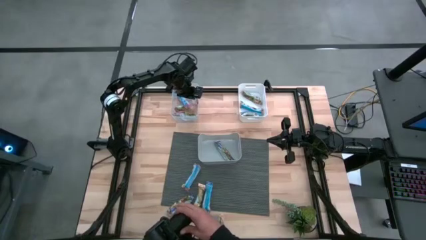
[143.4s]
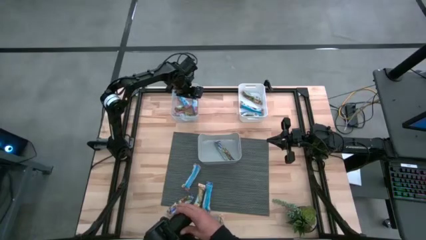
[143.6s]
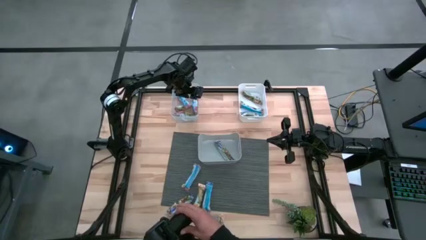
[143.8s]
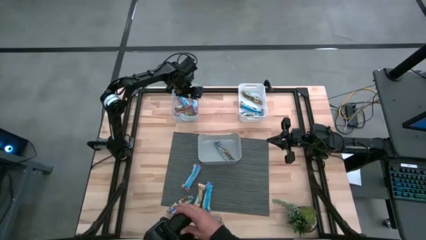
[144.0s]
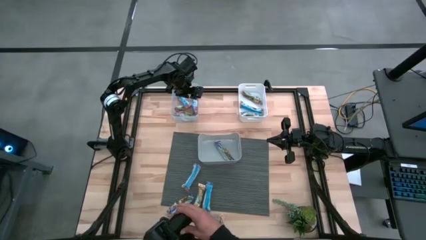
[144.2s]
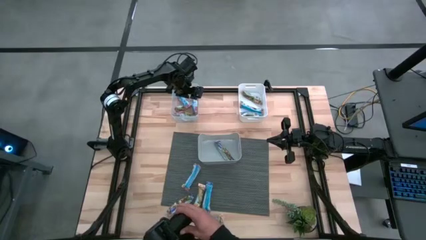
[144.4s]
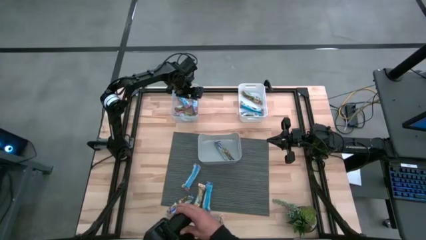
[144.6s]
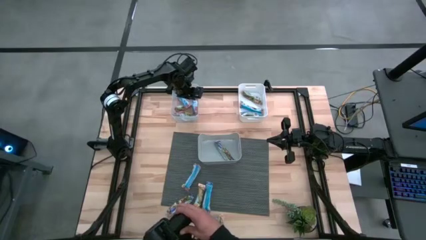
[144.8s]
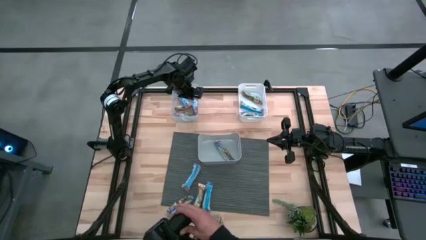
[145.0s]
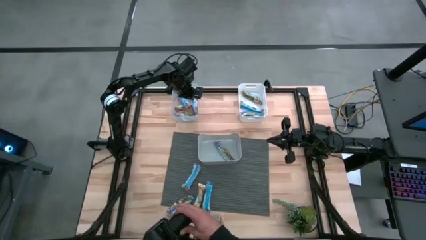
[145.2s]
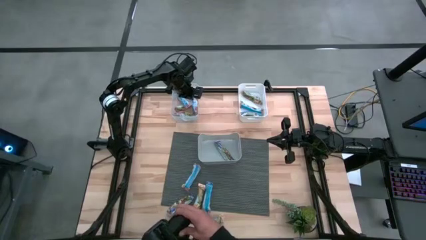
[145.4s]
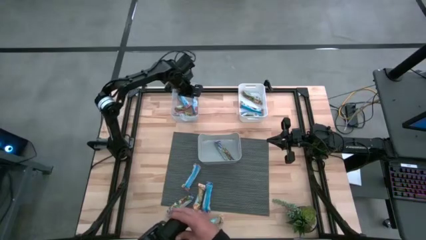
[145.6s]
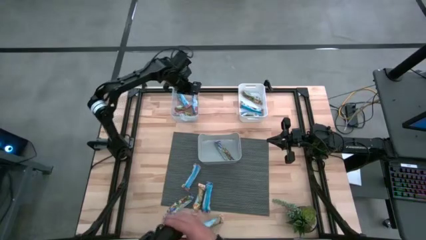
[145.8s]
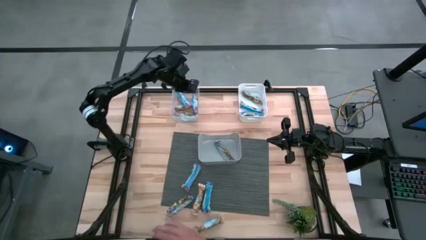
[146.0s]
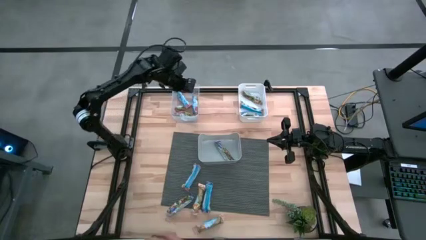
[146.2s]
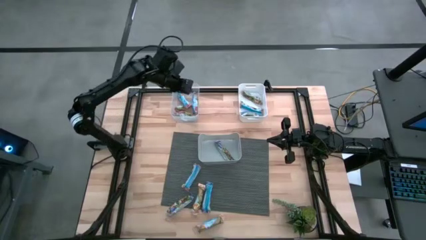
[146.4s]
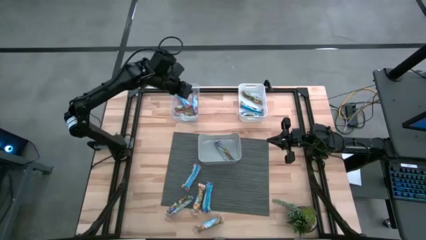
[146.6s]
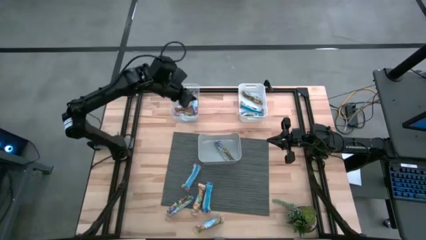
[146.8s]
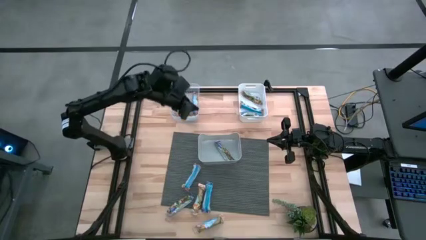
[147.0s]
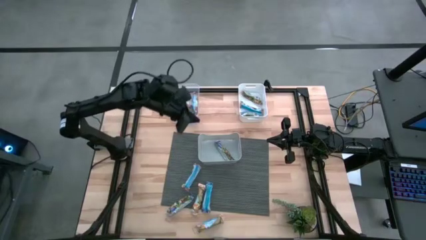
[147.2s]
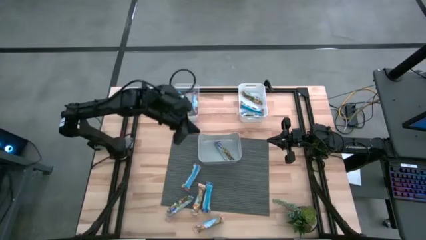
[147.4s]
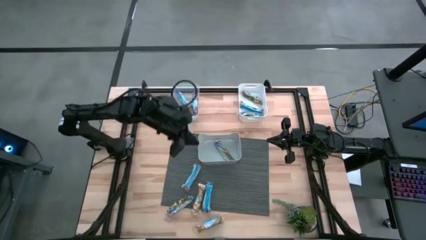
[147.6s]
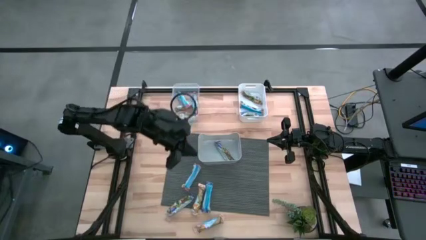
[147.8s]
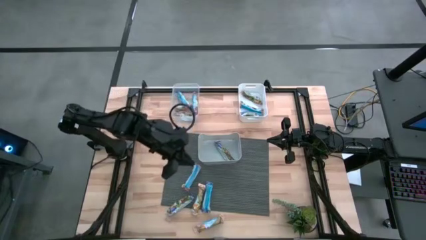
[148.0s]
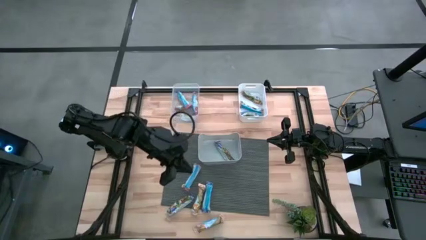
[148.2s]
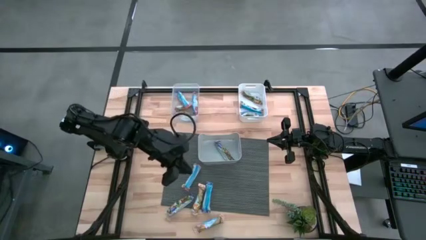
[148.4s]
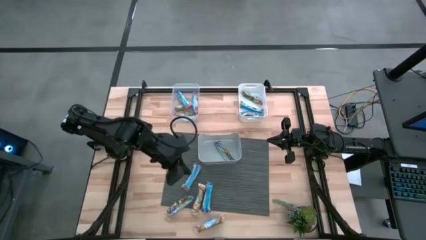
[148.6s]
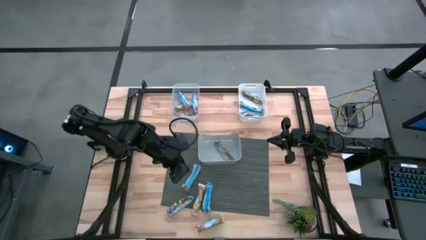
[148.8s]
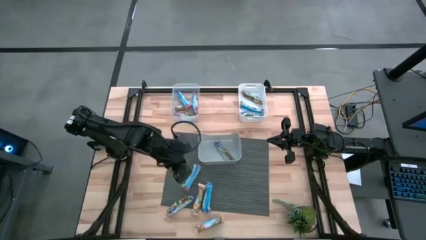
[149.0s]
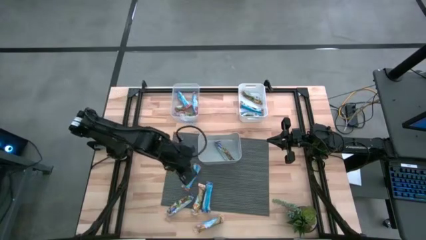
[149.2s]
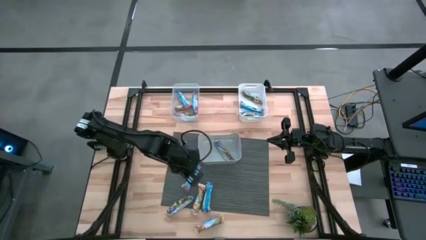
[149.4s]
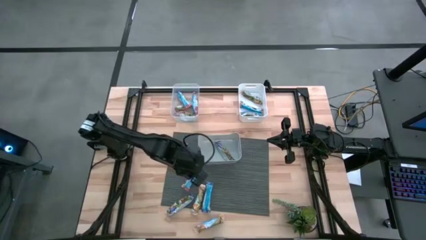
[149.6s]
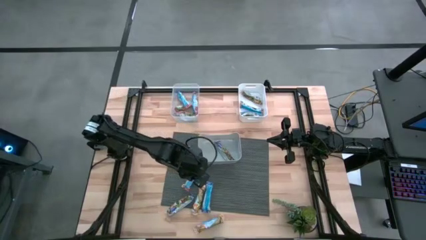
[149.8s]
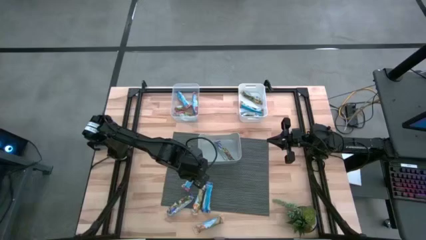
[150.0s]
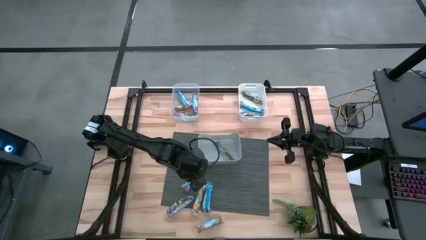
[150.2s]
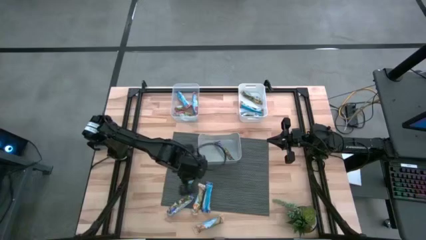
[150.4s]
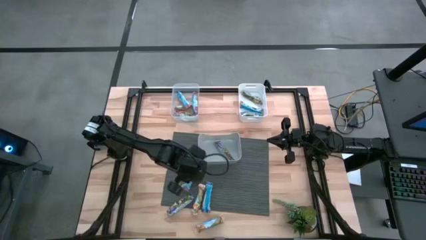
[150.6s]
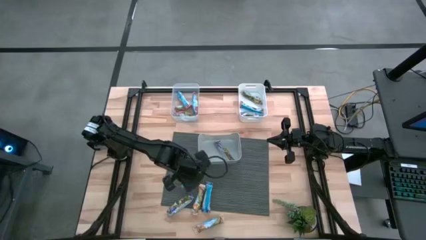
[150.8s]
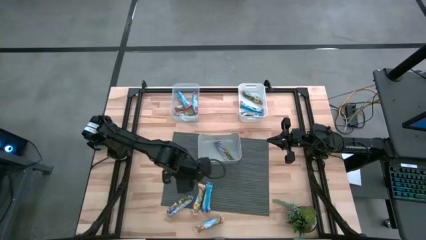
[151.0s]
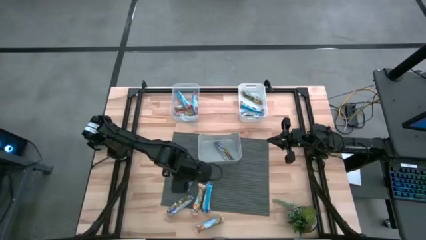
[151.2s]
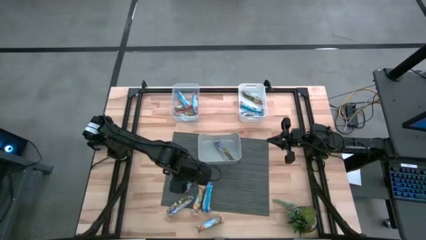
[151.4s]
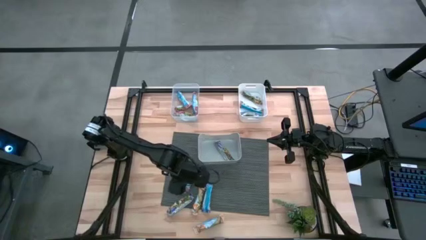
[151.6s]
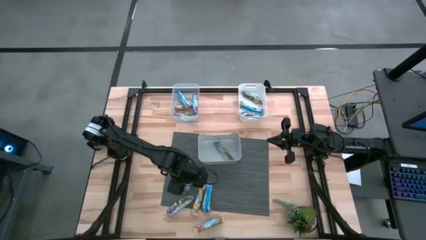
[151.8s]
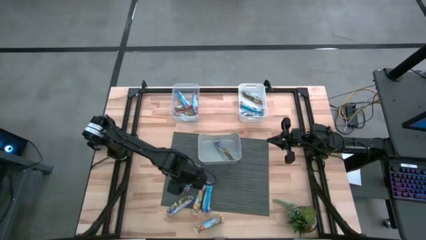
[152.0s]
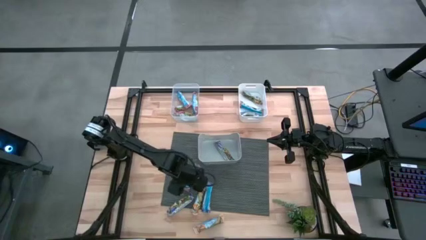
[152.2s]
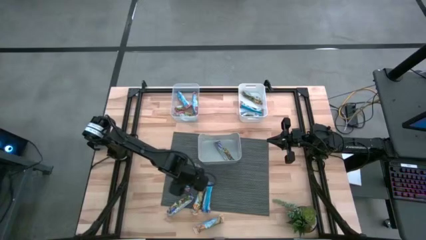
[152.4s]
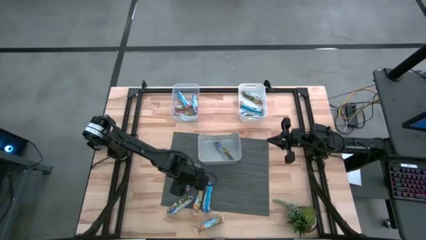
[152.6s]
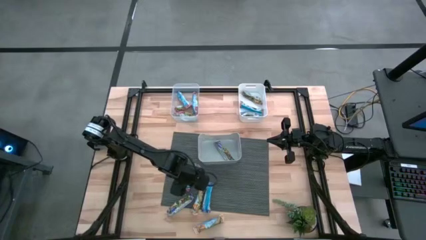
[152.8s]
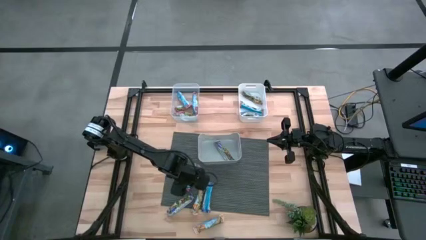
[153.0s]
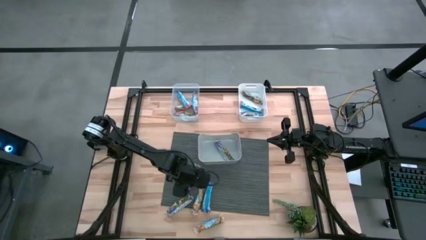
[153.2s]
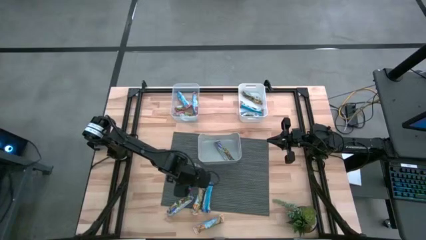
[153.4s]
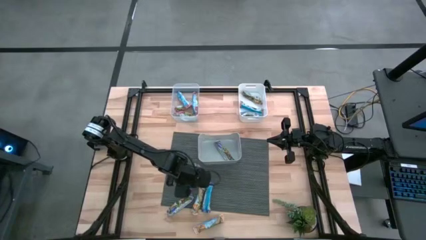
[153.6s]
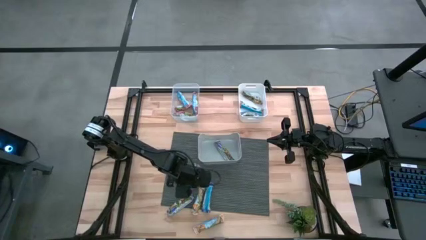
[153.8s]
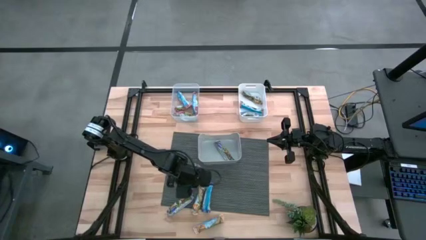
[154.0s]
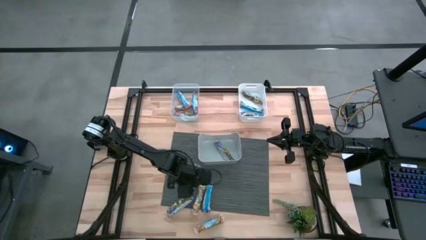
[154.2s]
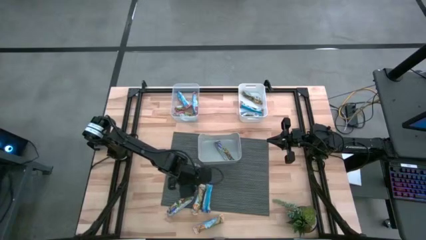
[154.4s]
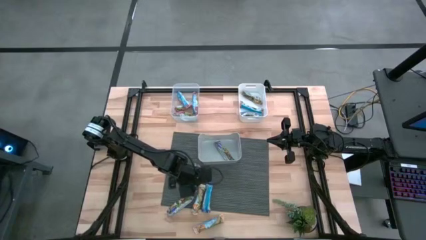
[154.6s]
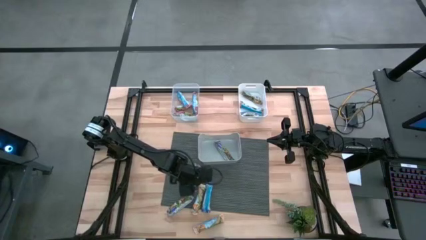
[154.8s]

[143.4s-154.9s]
Task: Pick and place Granola Bars by type
Put the red granola bar into the transparent bin

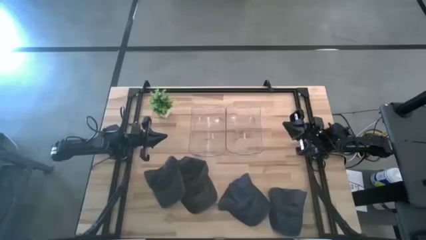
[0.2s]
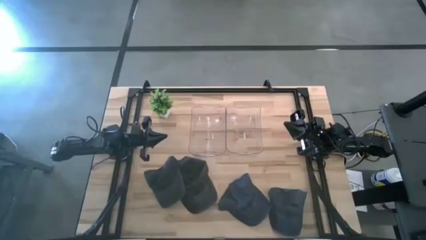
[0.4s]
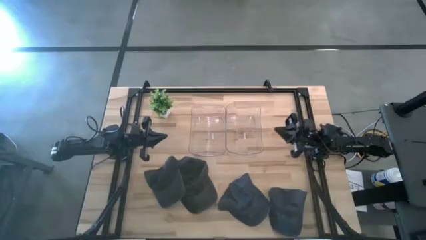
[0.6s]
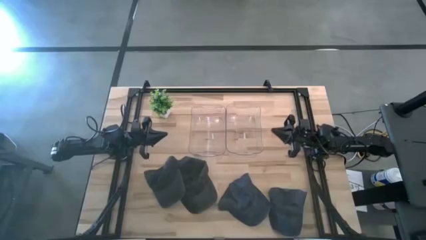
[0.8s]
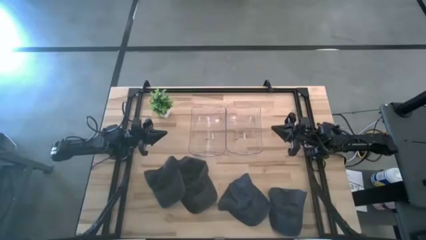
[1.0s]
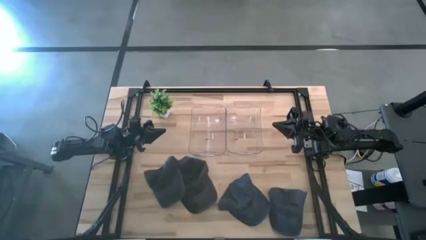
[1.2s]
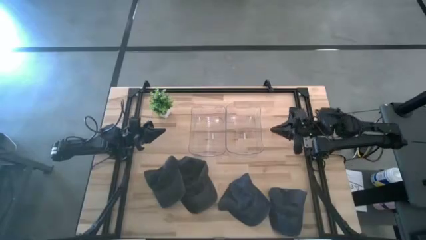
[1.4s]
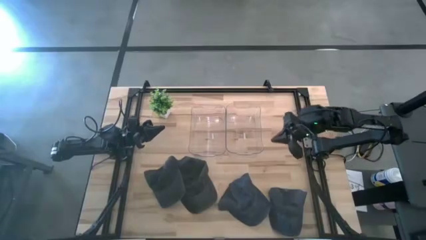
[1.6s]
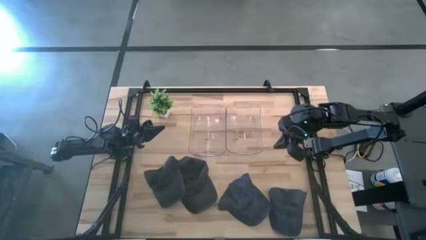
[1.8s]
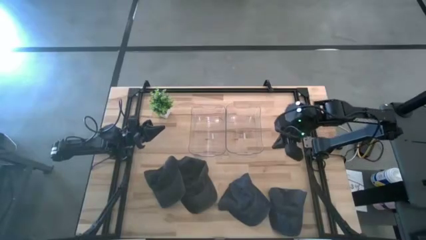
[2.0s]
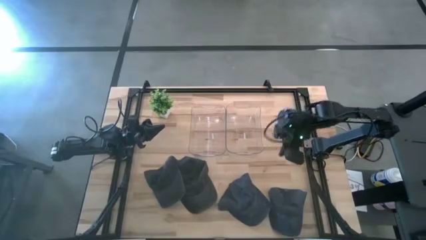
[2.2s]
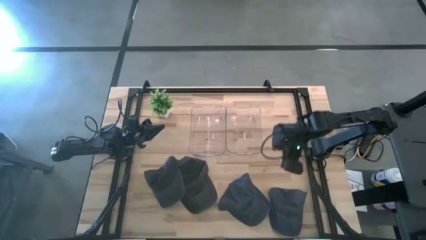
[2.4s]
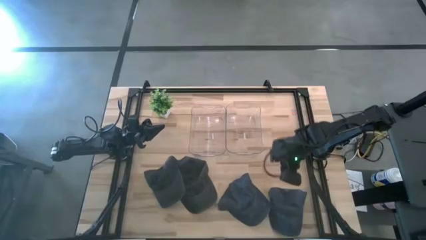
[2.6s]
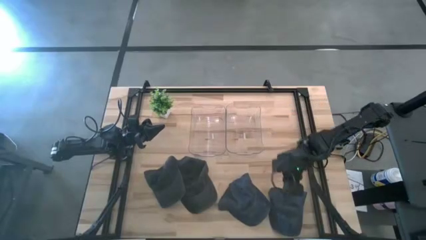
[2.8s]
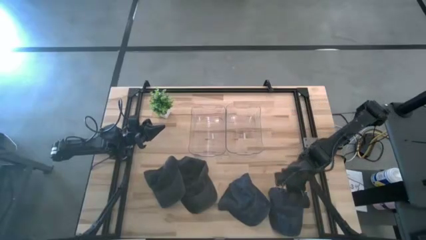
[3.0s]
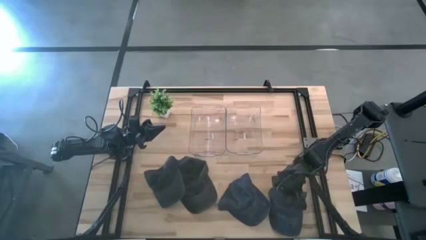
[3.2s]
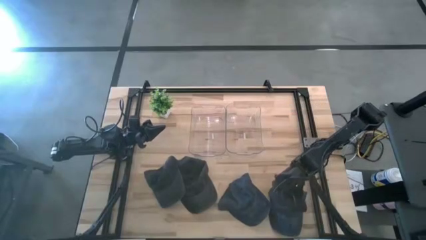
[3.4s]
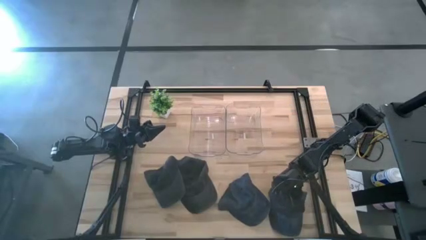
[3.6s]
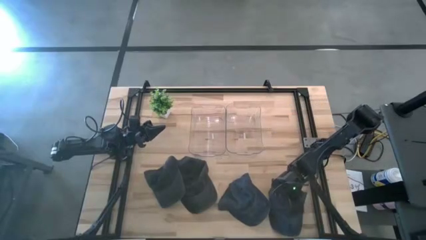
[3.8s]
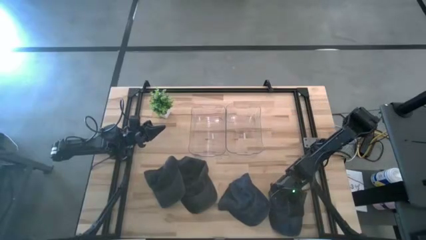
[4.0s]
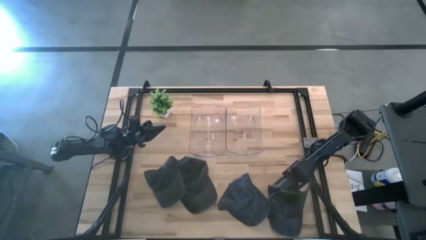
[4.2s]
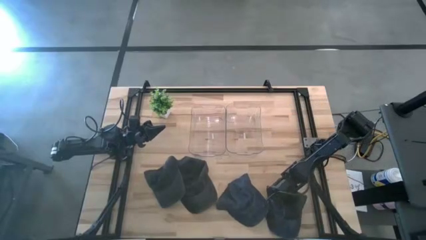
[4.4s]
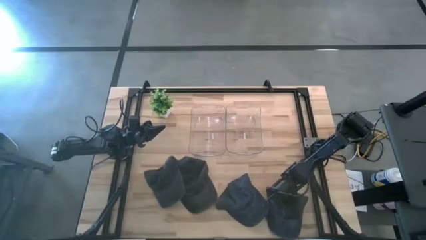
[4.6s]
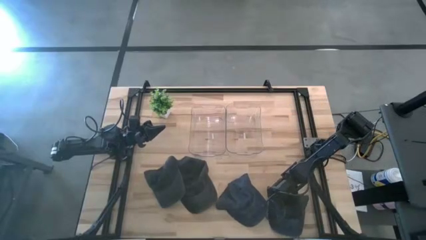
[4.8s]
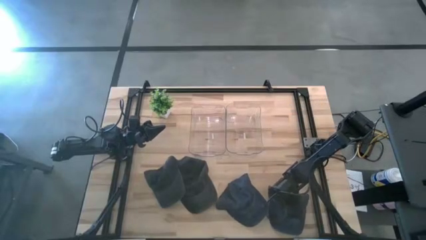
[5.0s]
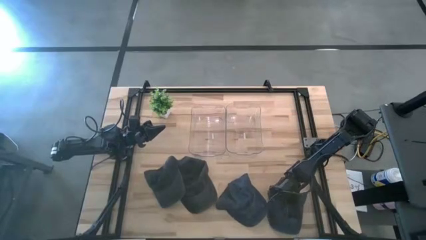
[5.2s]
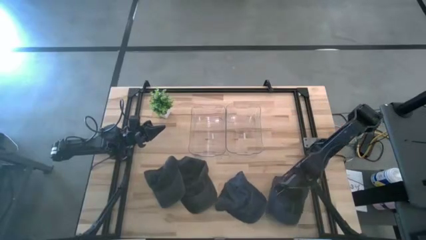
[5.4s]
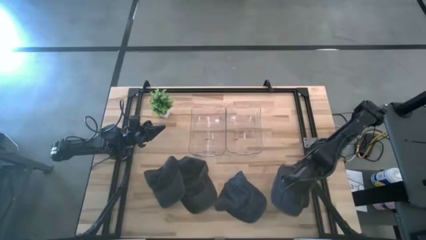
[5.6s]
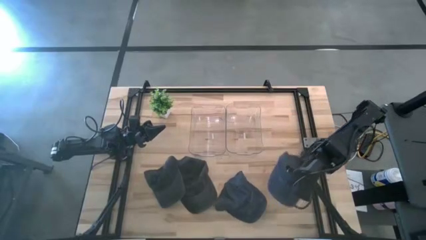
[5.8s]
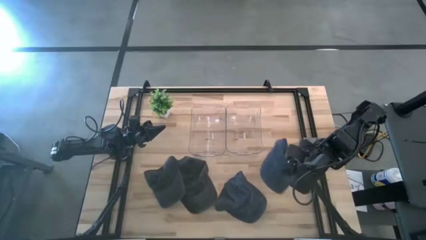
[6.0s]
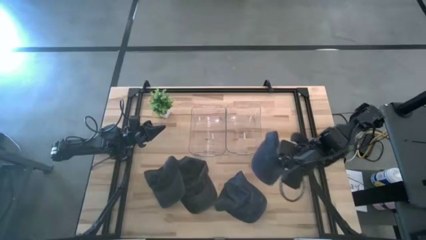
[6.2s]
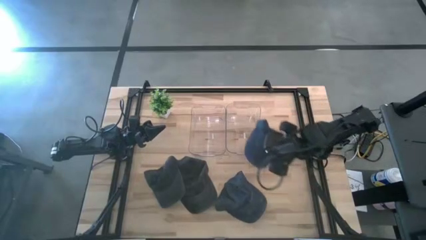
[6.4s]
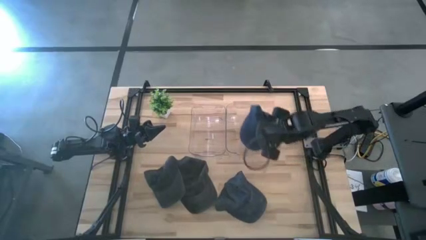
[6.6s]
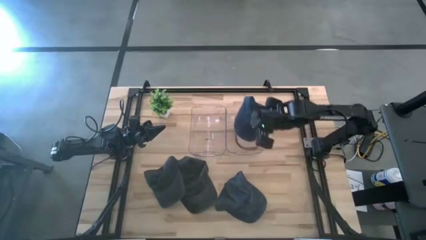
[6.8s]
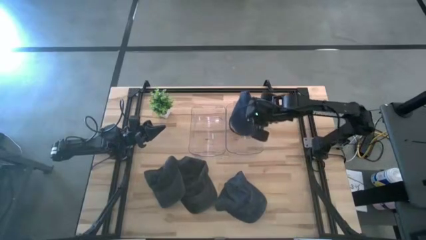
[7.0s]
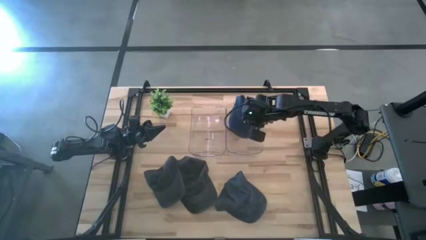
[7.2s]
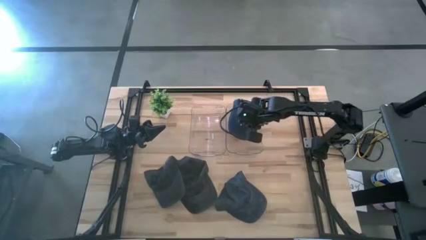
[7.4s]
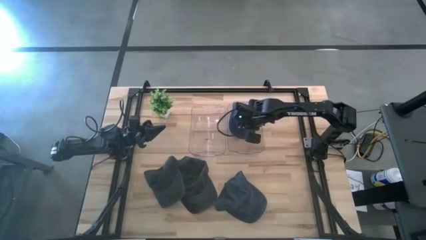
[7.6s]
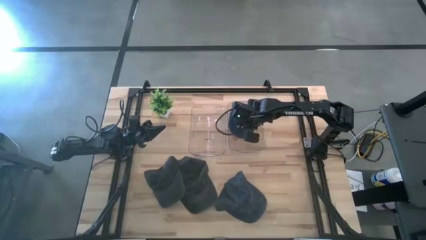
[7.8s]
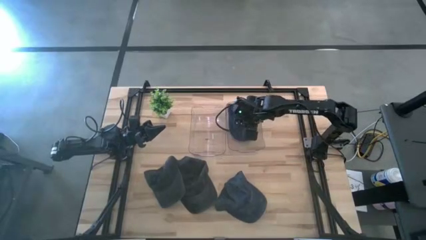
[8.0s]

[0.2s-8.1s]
Task: Pick & Place hat
Put the right blue cap into the right transparent bin
